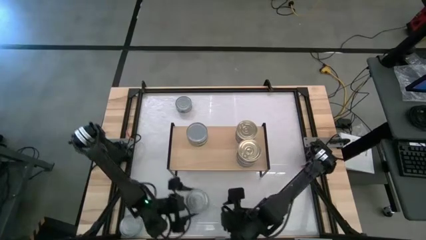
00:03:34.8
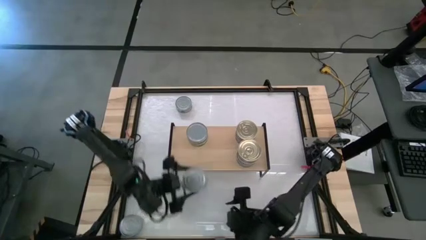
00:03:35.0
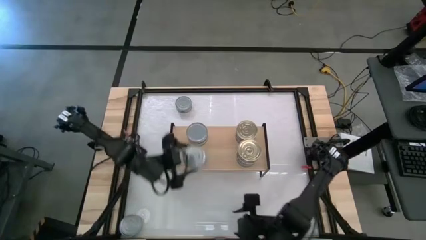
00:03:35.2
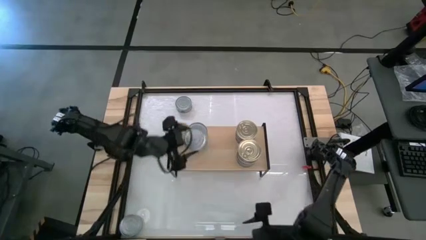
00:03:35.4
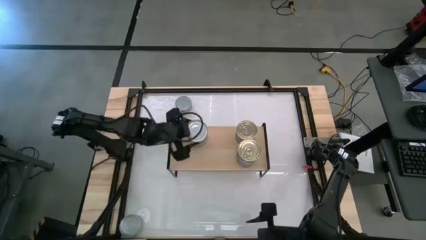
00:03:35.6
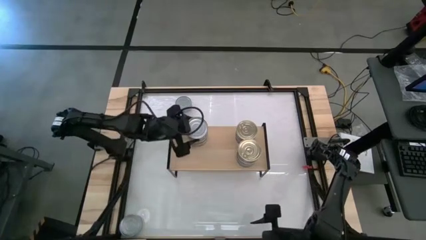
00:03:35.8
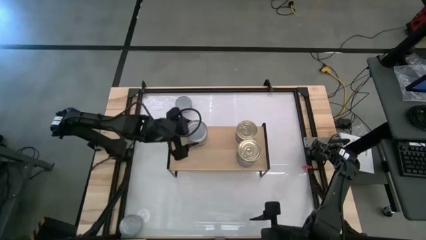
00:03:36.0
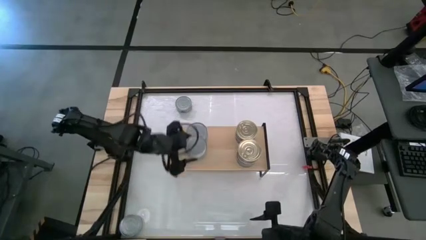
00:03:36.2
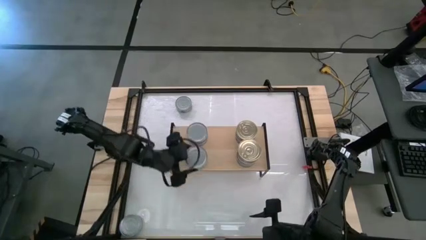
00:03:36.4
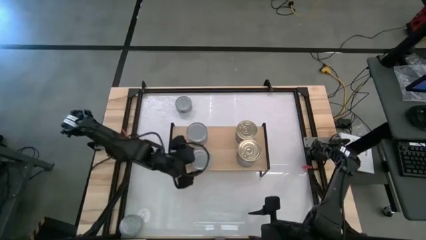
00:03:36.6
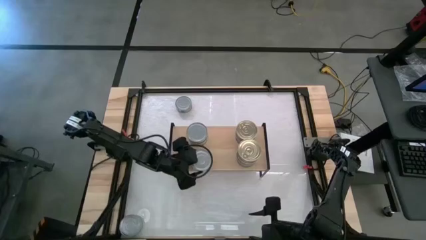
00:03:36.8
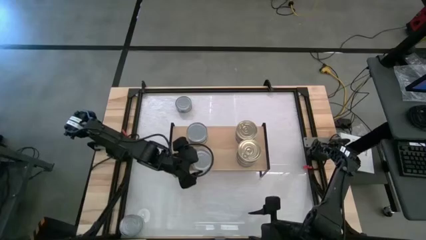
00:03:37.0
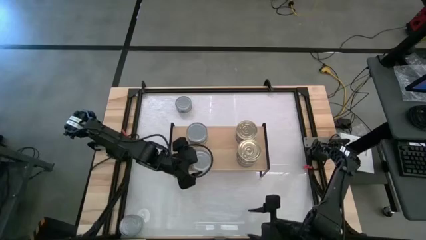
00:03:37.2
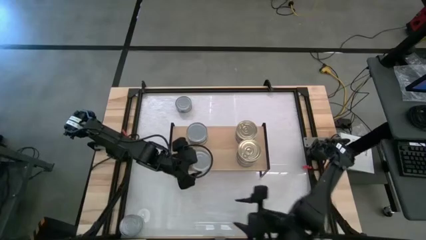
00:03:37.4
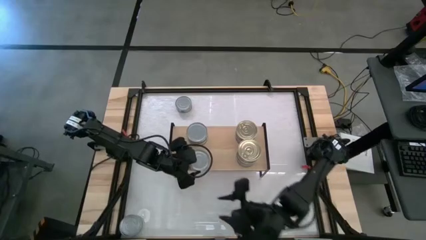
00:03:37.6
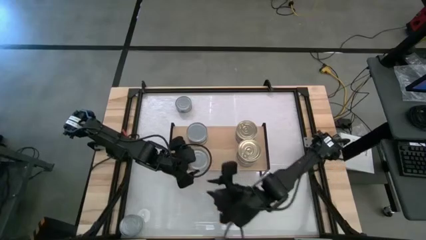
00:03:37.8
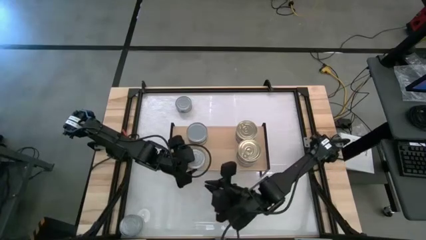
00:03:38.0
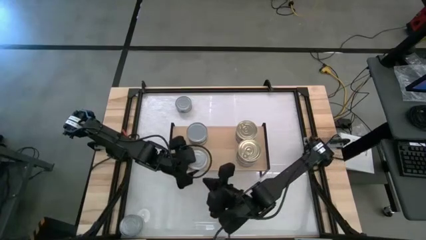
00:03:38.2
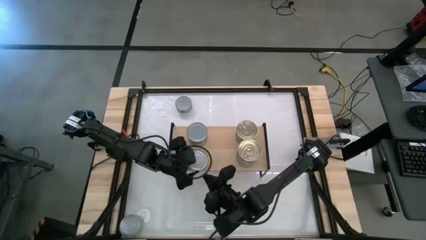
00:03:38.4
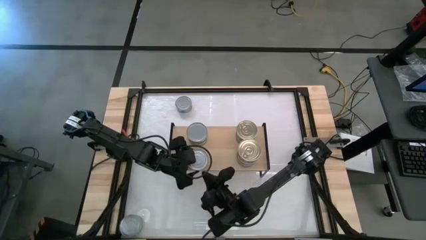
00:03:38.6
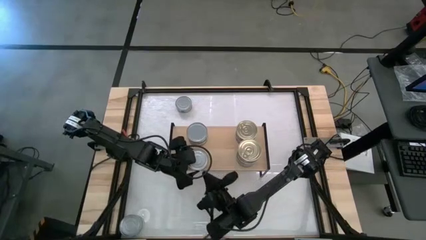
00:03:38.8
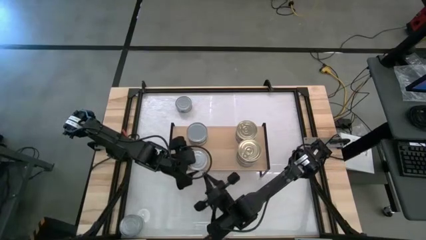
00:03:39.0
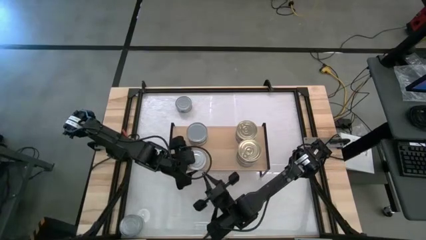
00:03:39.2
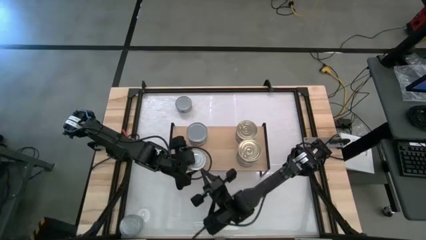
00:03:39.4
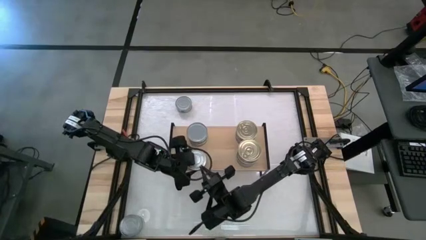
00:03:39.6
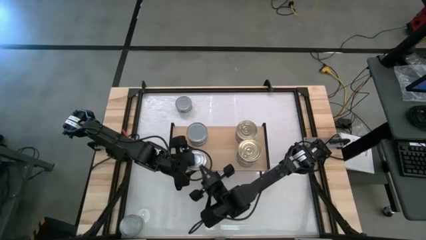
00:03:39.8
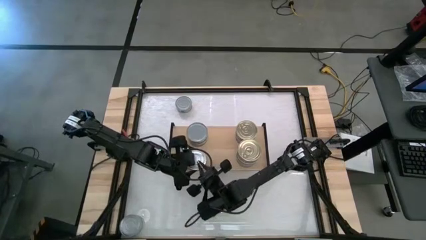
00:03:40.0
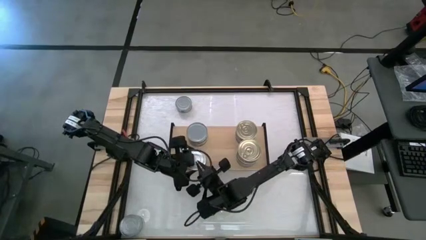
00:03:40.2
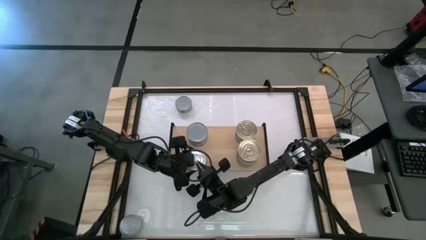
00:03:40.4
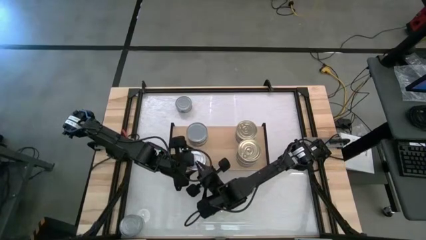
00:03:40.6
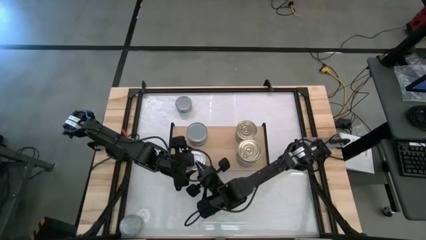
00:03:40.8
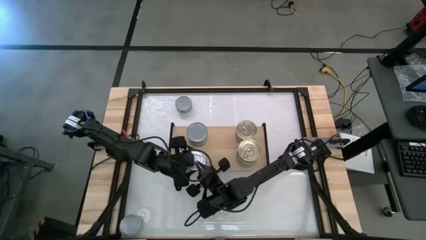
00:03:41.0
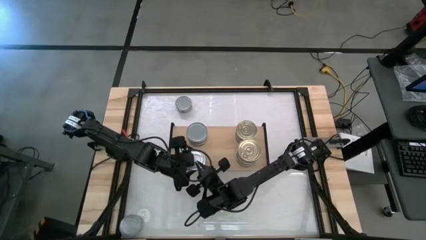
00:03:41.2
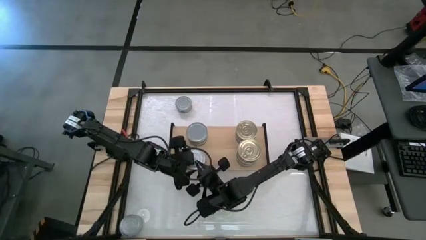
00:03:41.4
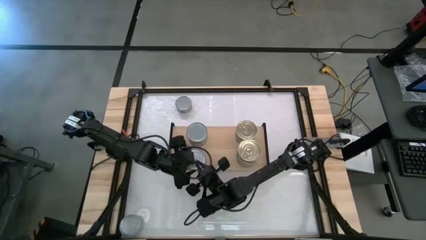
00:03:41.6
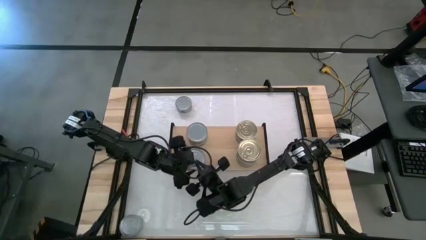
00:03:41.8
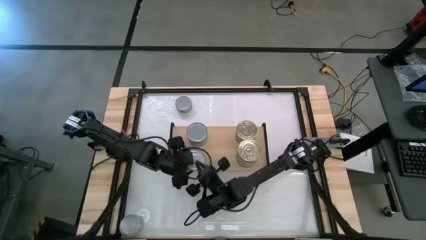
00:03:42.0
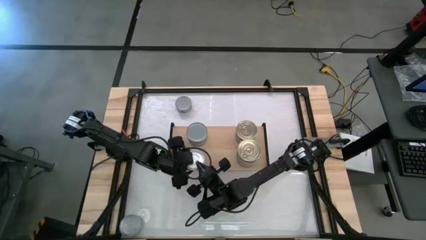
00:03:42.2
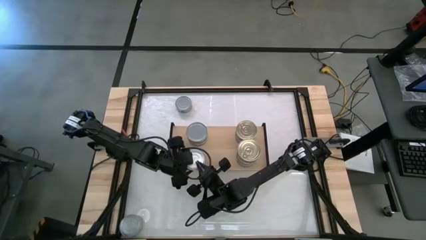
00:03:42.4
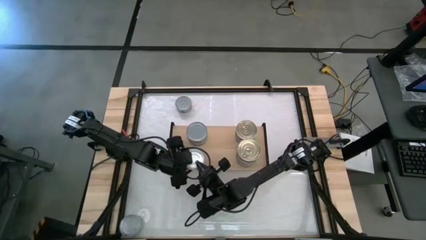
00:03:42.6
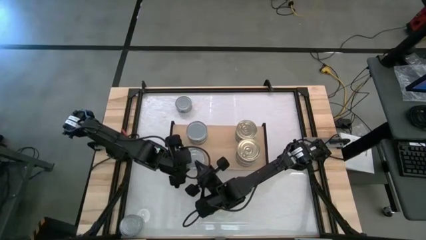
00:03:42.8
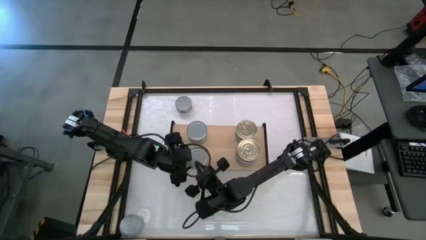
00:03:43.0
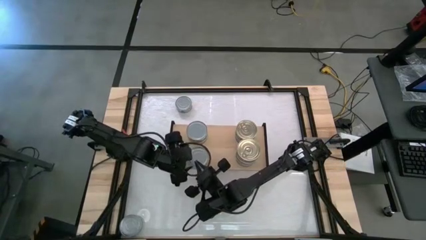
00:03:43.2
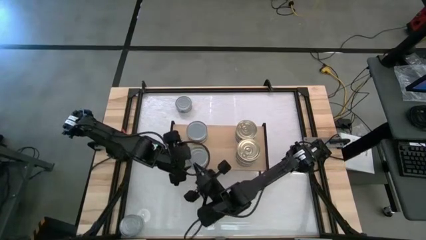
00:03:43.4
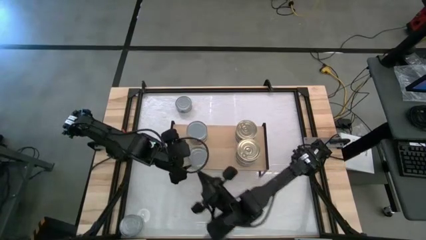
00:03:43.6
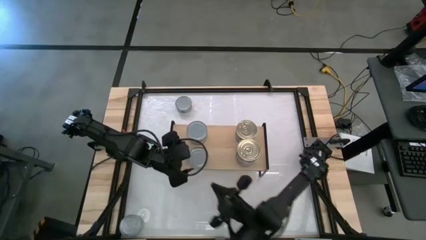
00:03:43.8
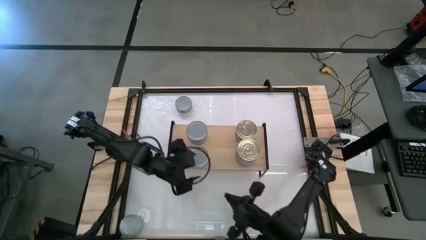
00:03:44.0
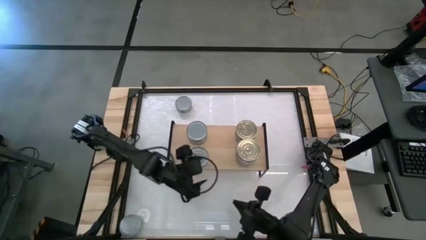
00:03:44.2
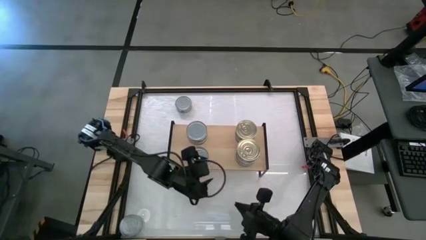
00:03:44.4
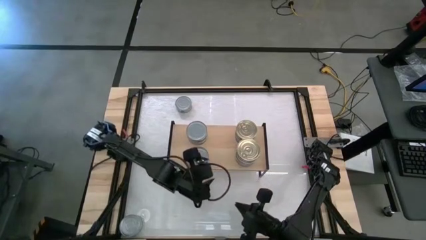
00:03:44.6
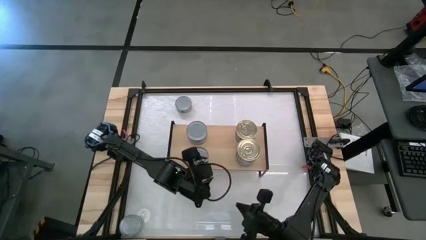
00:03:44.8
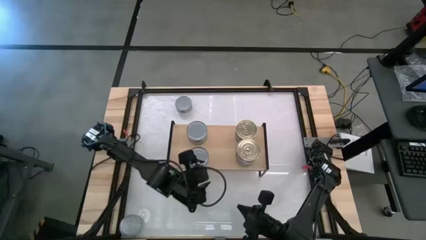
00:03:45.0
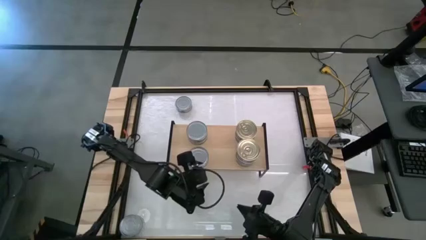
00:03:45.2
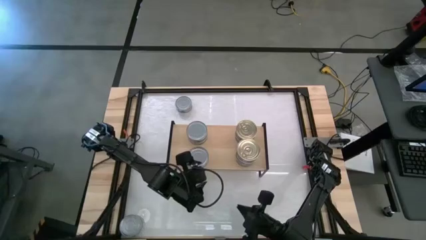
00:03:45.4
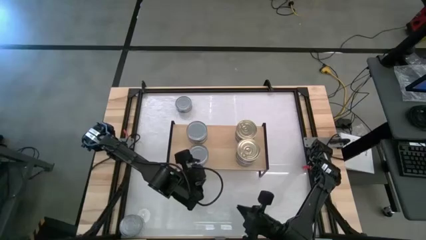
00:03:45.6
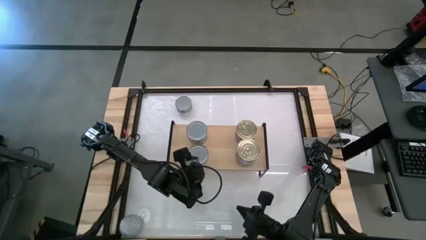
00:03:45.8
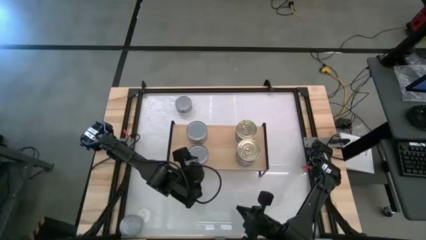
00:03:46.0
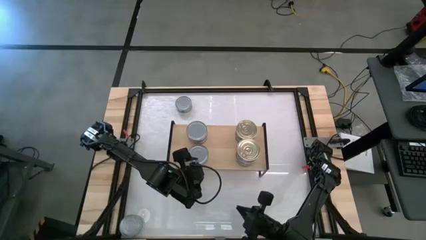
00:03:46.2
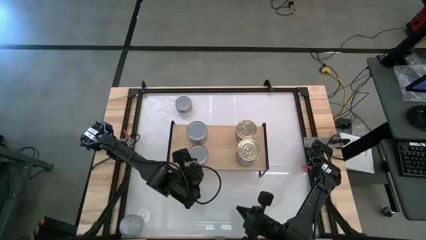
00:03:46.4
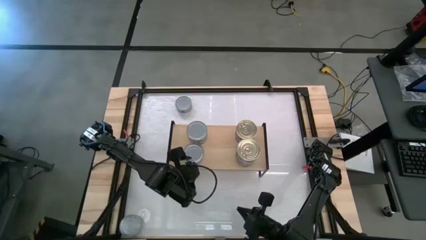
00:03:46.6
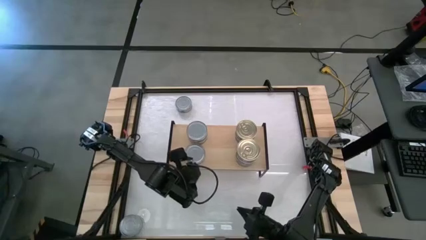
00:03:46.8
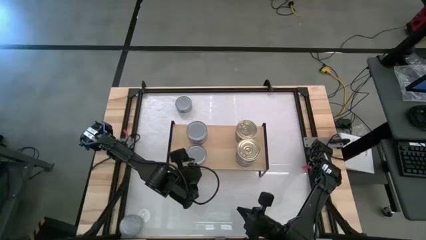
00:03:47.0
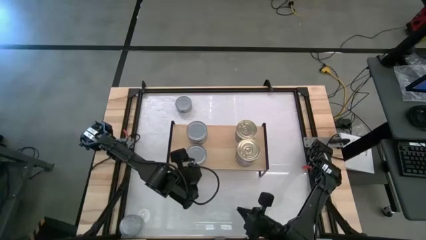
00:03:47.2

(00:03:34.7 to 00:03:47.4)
Task: Stack canned seafood by type on shelf
Put the green tuna can on the shelf
